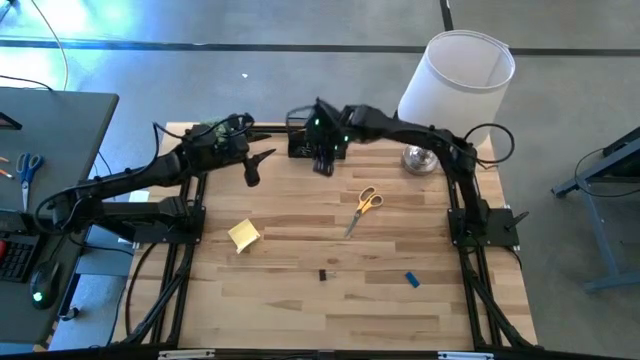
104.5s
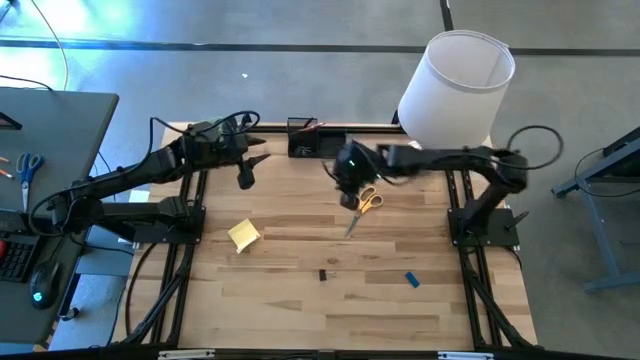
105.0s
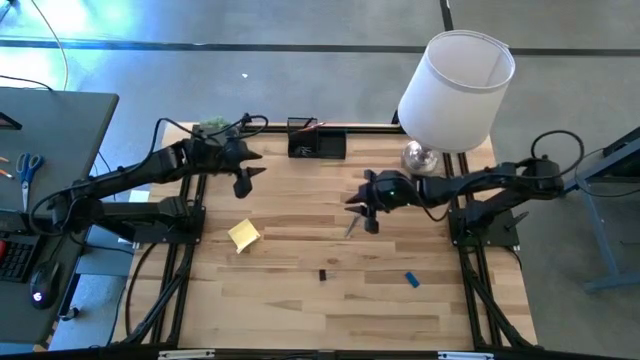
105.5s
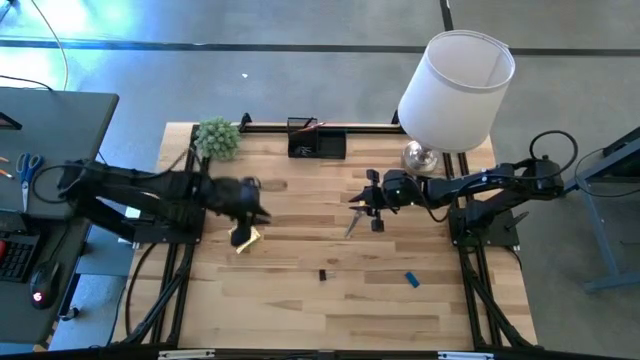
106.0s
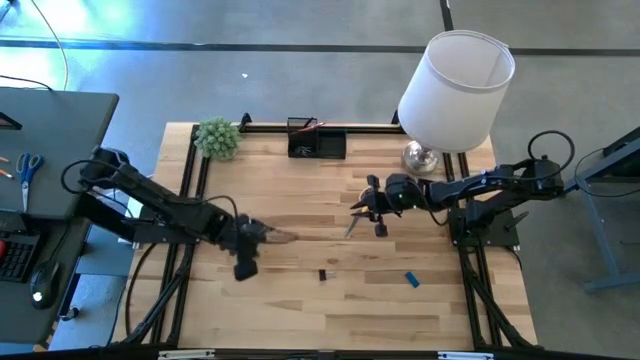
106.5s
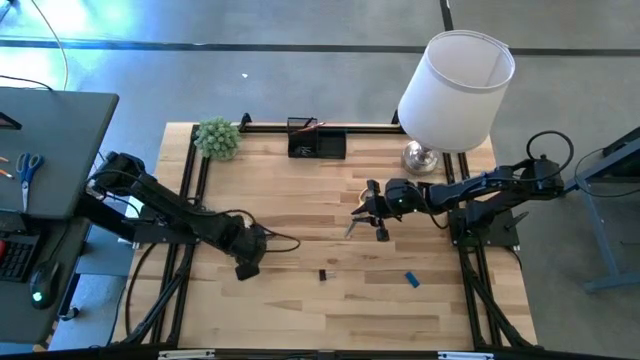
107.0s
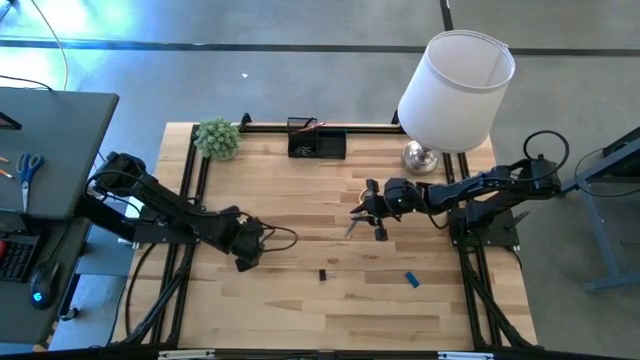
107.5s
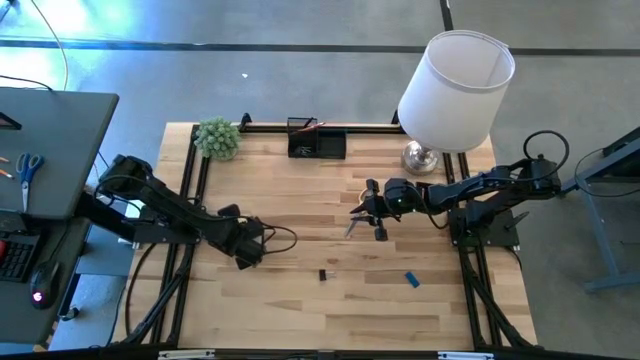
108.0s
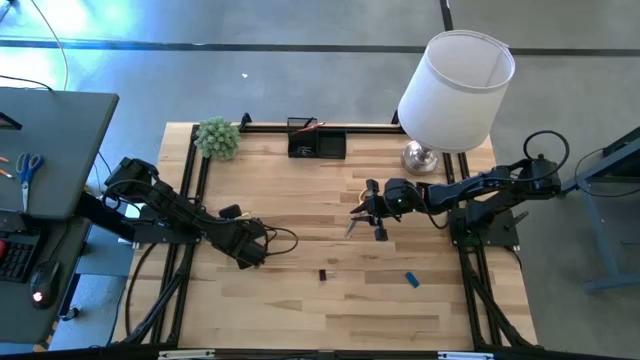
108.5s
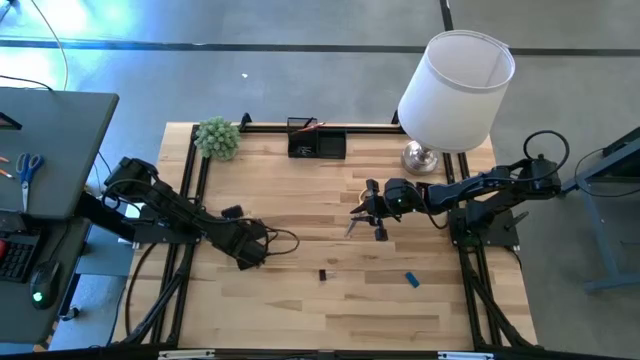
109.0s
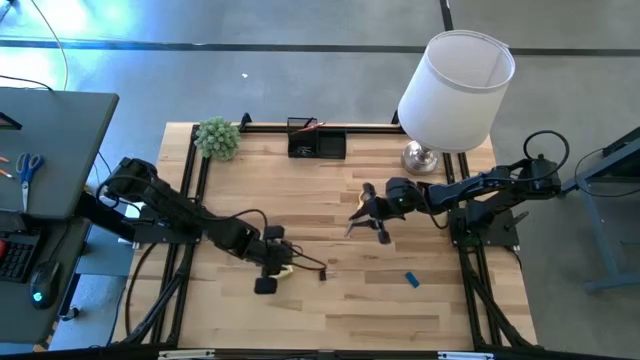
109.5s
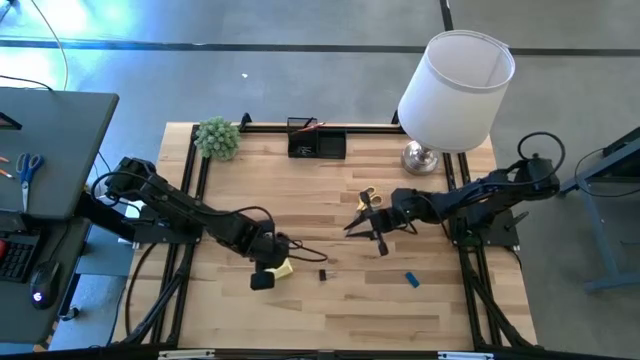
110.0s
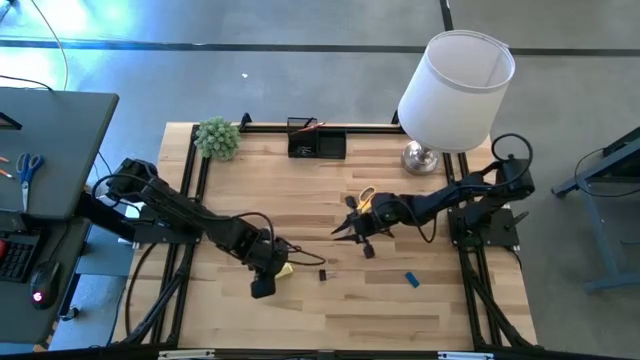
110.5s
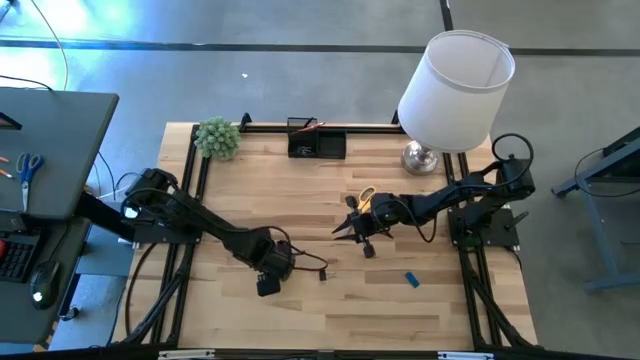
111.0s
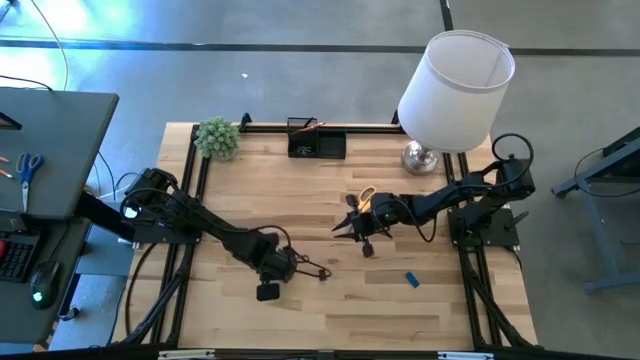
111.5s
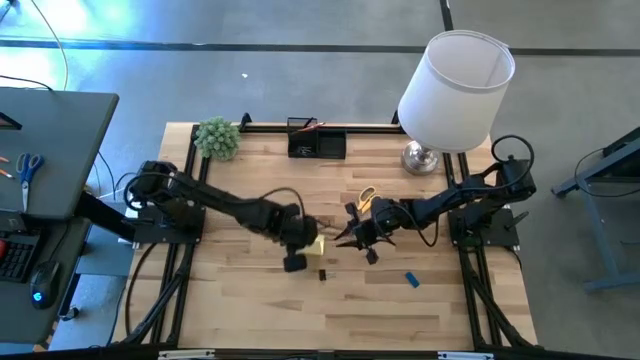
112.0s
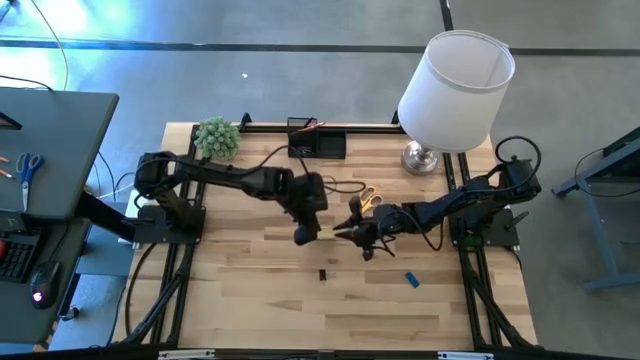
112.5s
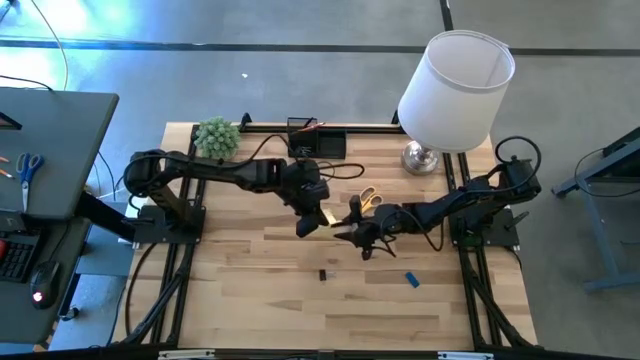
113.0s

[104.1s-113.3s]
Task: Pick and place office supplies into organizer
Put the sticky notes into the right slot of the desk organizer

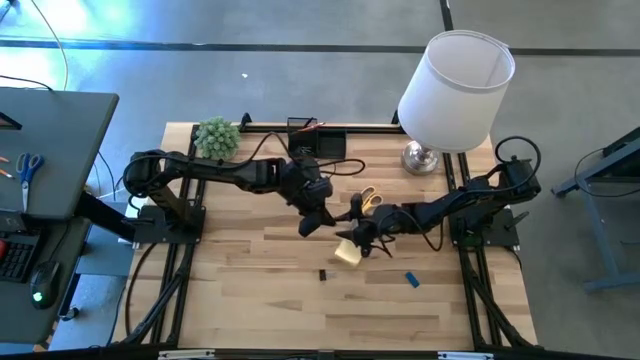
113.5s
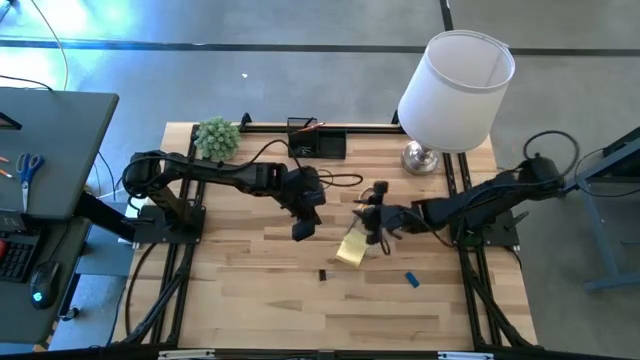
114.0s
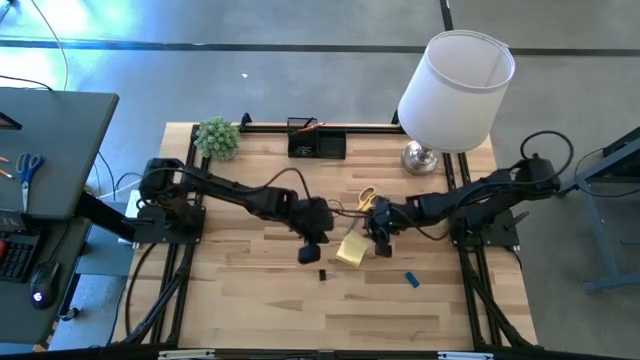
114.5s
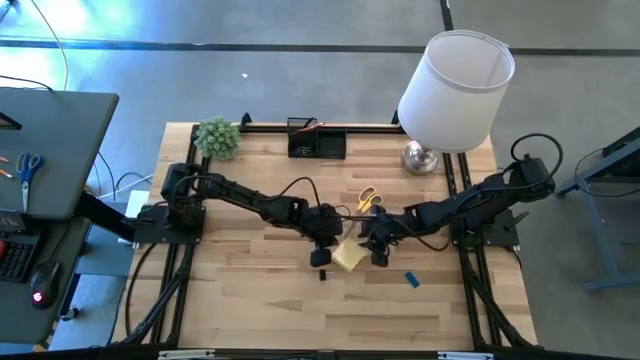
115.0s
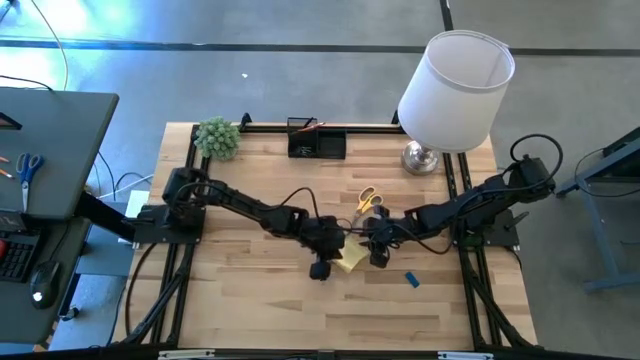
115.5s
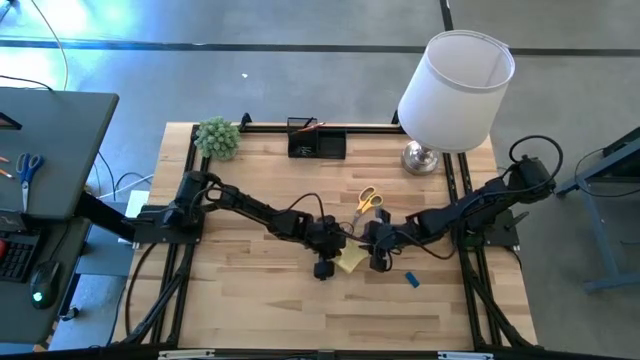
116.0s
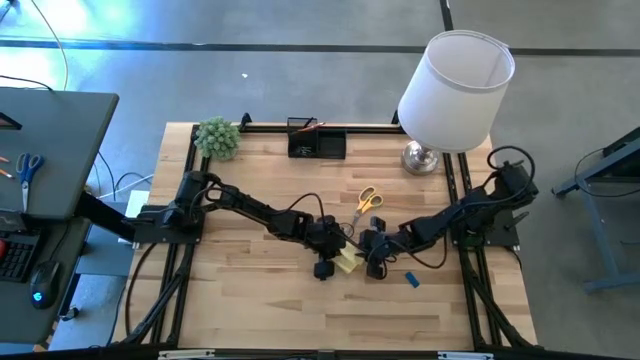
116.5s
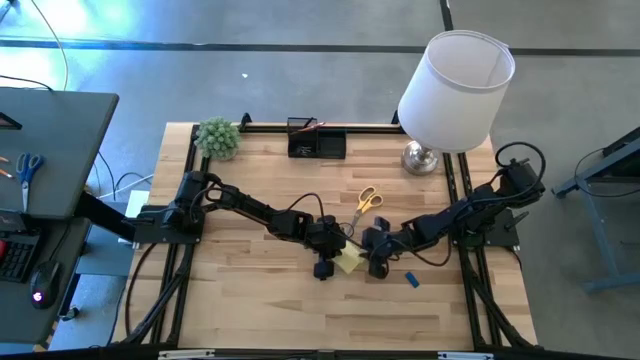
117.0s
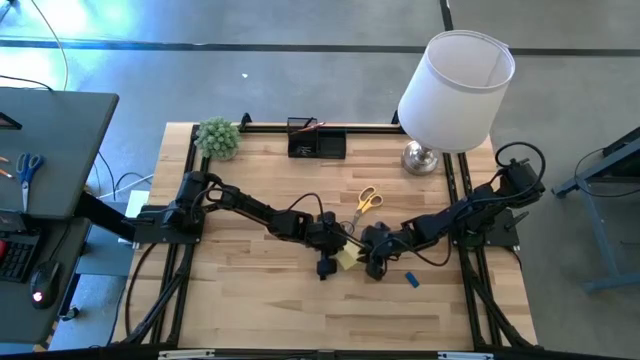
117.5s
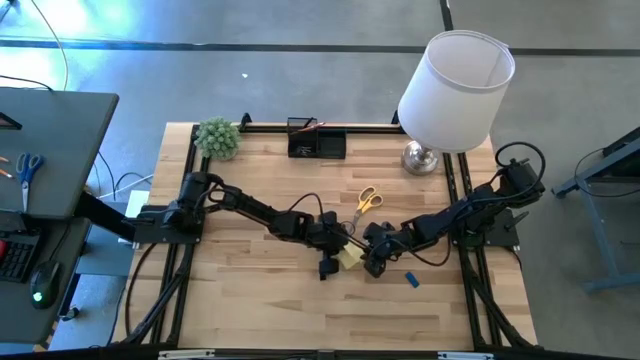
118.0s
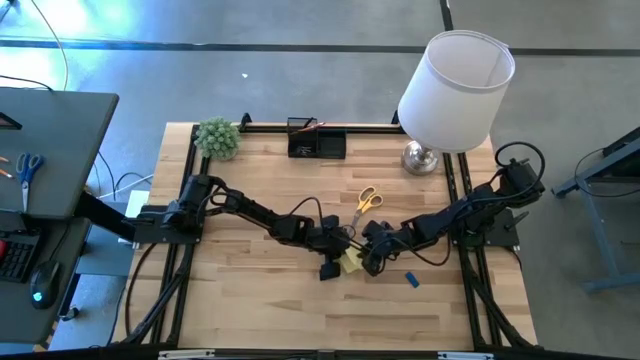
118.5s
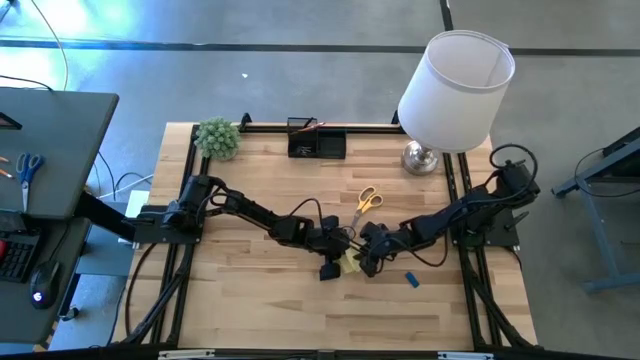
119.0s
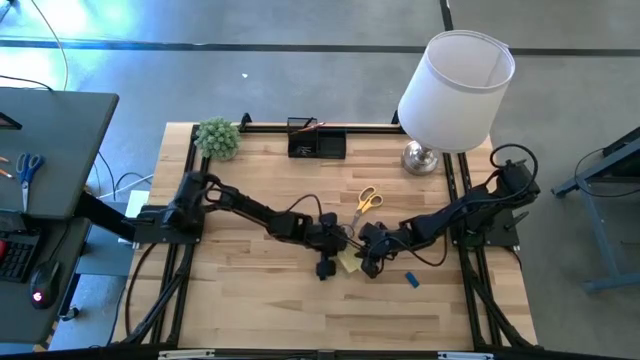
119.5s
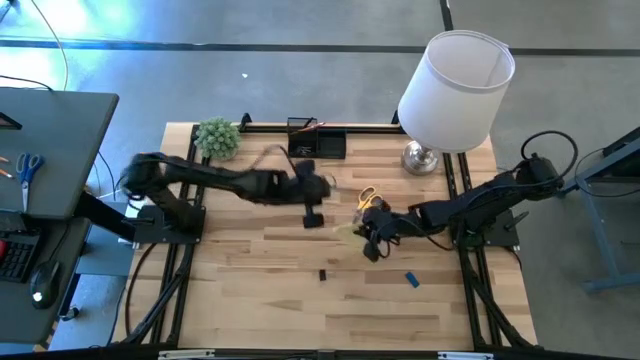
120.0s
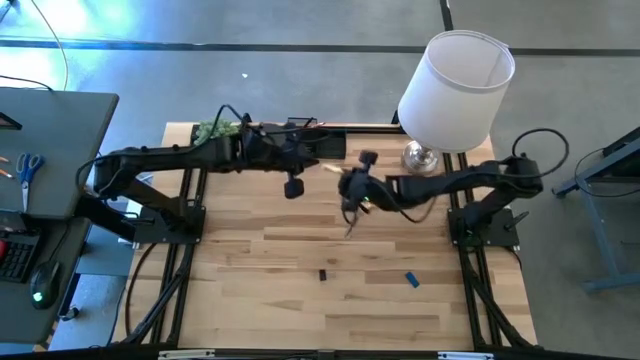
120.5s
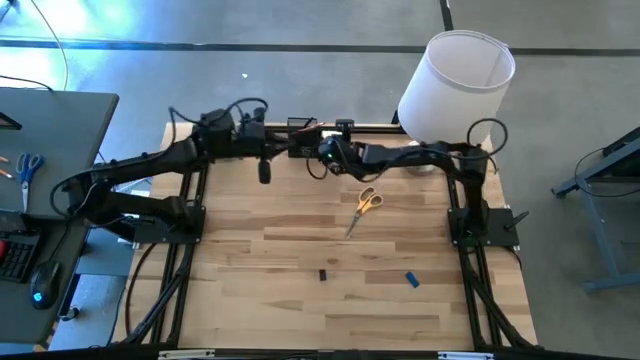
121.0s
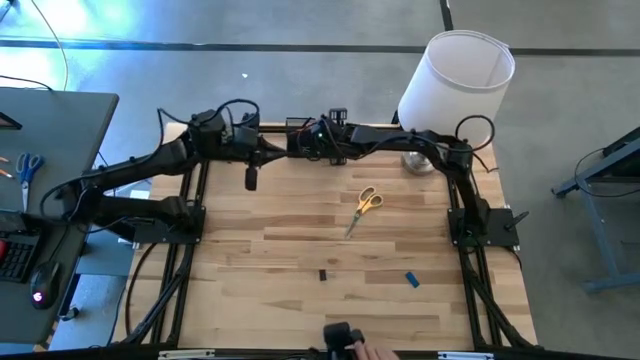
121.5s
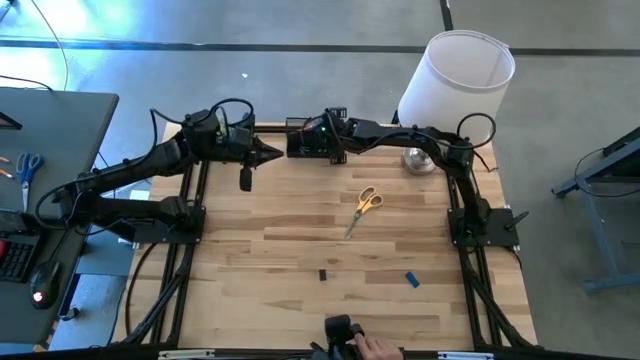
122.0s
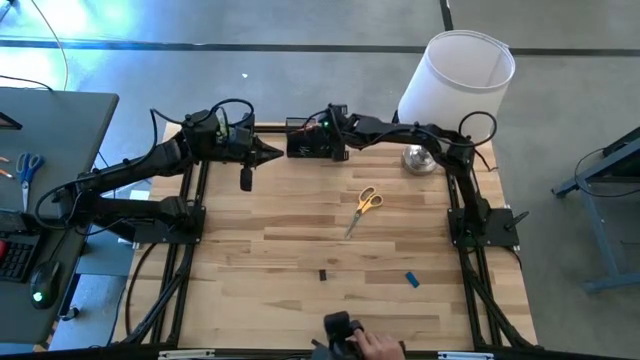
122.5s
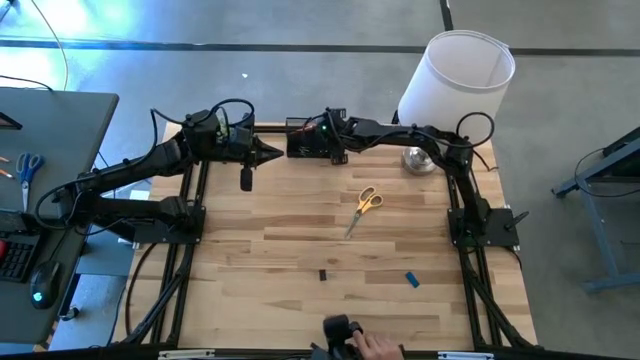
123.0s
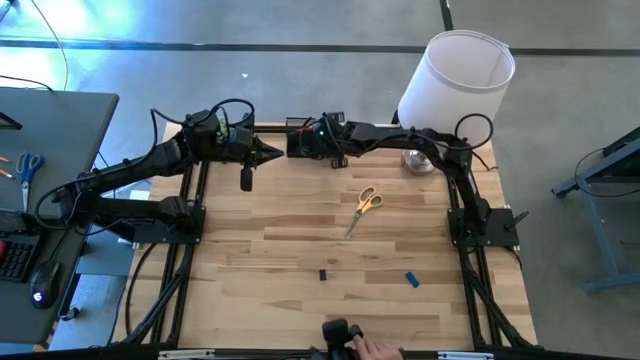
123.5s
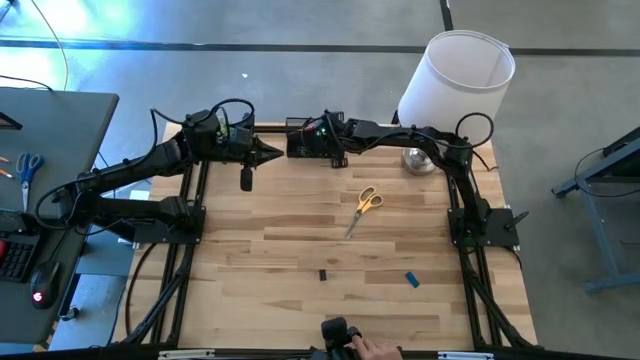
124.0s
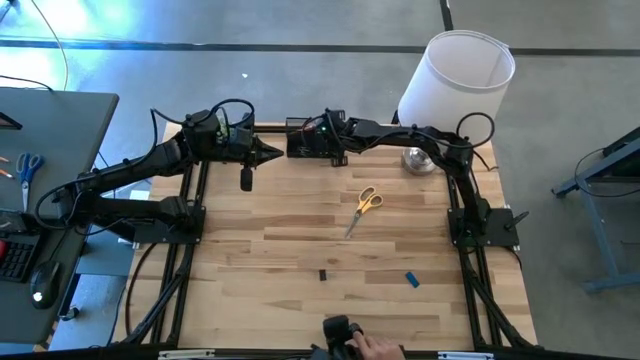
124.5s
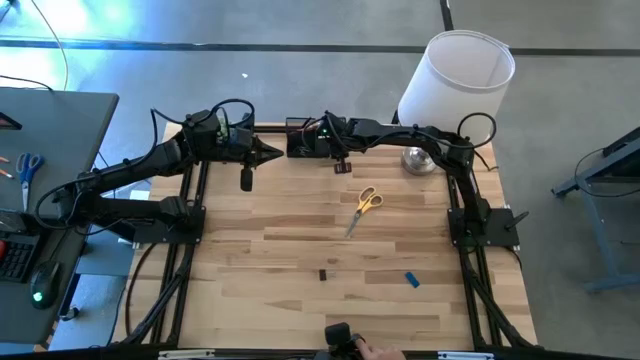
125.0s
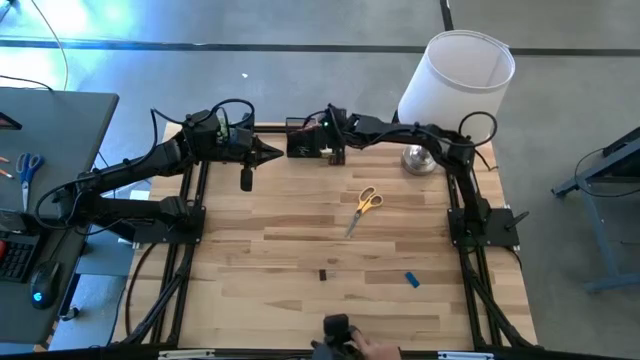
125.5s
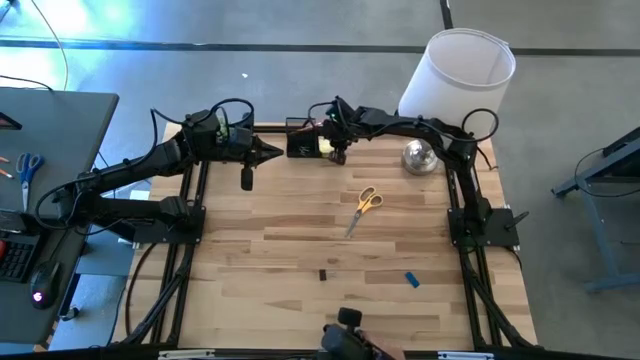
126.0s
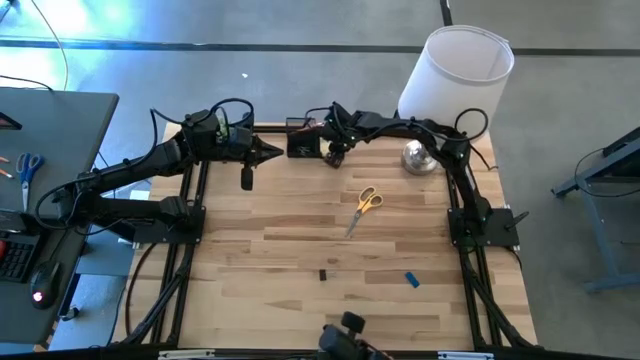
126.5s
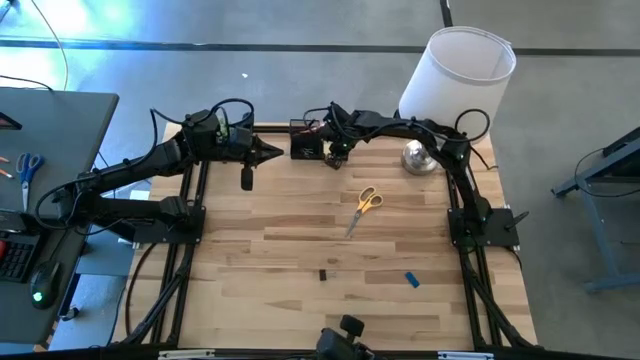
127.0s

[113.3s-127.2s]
Put the sticky notes into the right slot of the desk organizer
